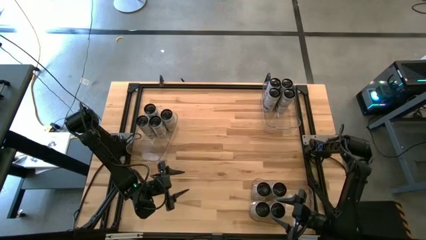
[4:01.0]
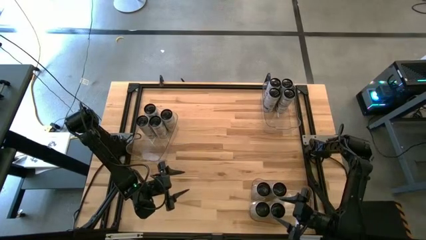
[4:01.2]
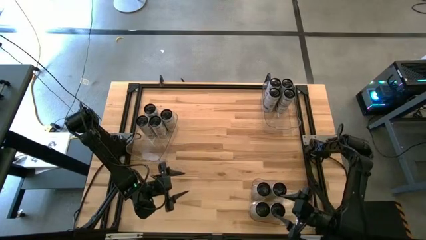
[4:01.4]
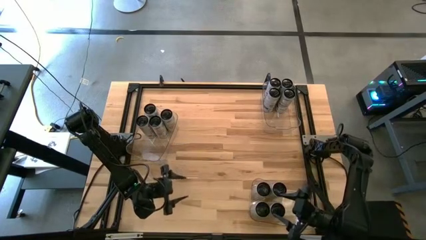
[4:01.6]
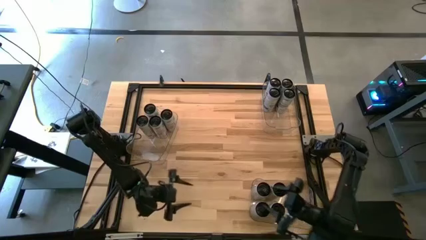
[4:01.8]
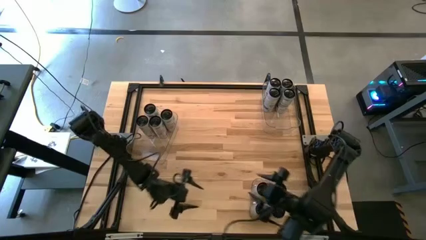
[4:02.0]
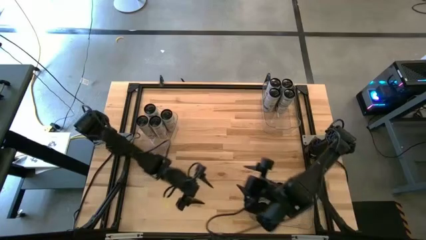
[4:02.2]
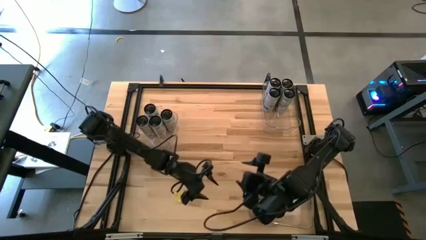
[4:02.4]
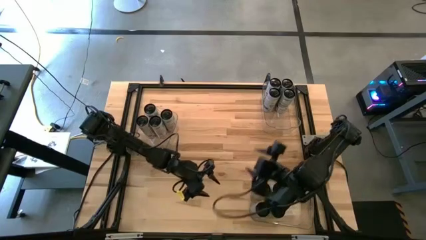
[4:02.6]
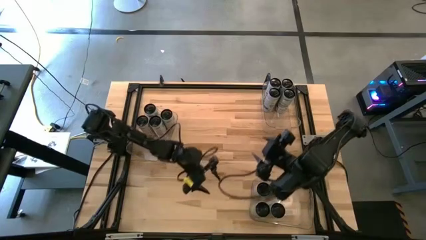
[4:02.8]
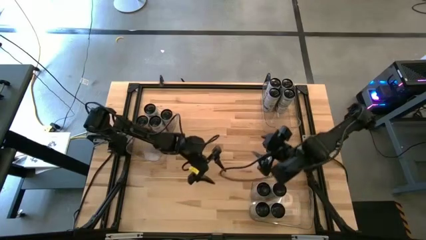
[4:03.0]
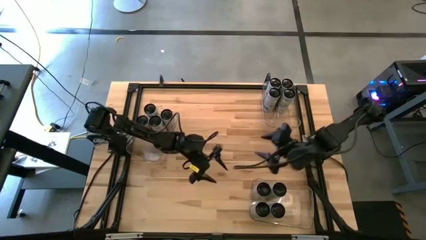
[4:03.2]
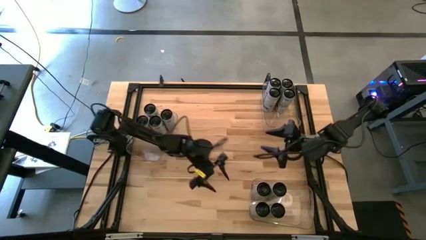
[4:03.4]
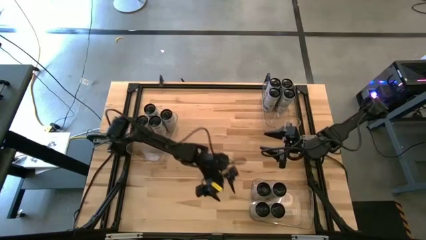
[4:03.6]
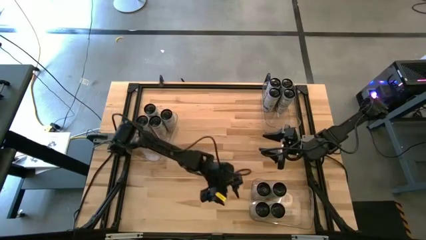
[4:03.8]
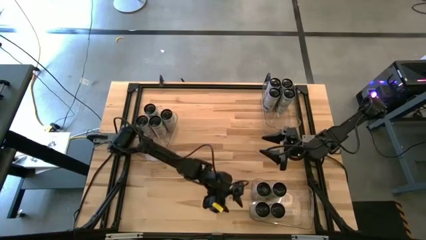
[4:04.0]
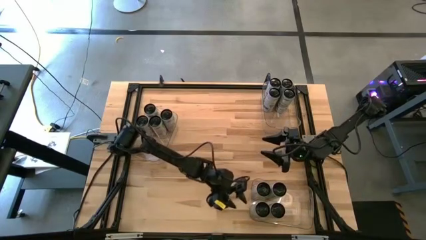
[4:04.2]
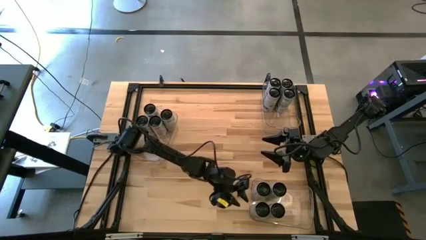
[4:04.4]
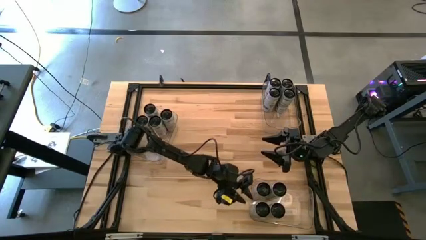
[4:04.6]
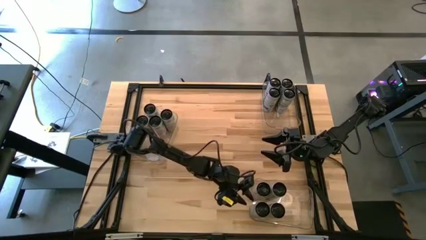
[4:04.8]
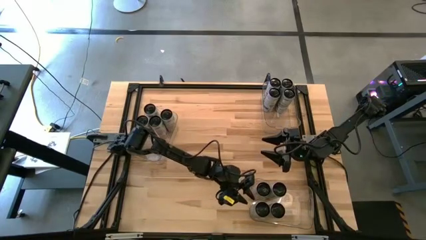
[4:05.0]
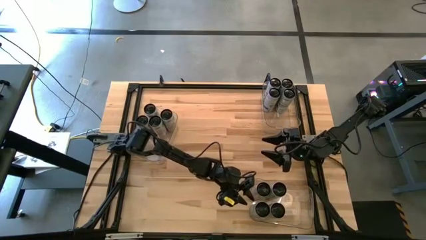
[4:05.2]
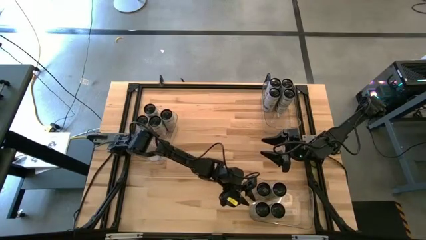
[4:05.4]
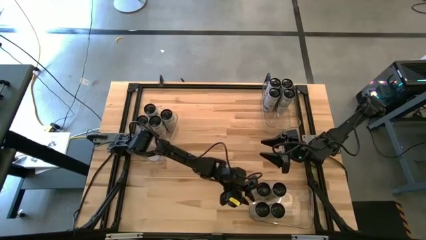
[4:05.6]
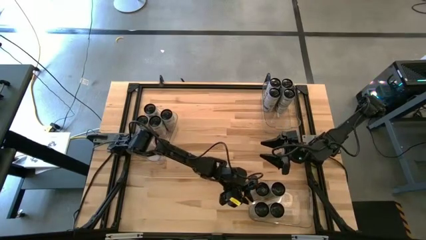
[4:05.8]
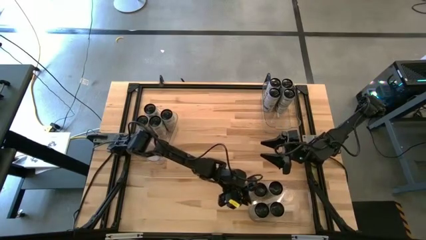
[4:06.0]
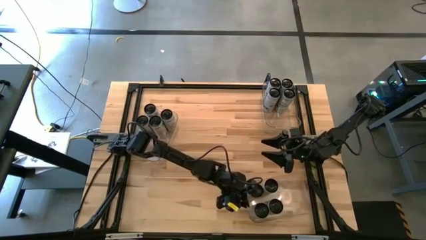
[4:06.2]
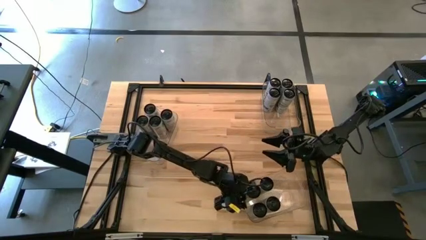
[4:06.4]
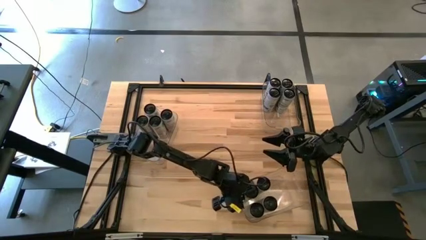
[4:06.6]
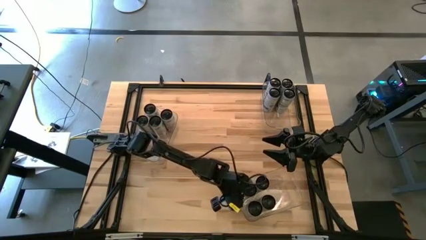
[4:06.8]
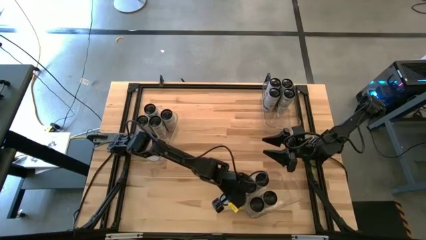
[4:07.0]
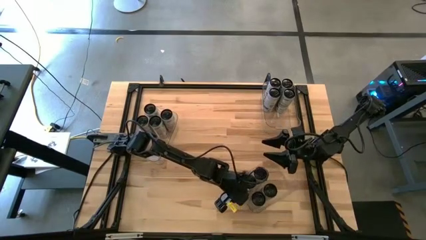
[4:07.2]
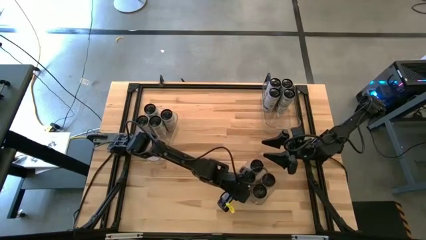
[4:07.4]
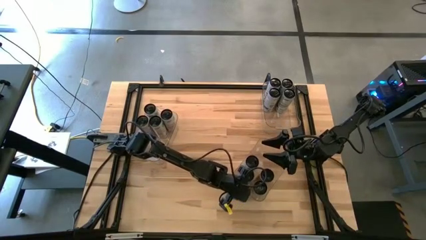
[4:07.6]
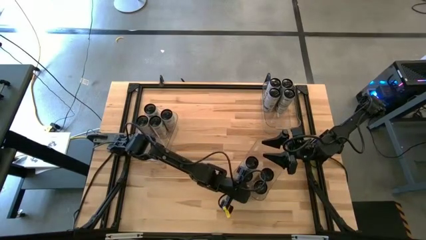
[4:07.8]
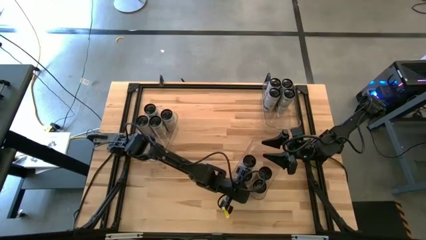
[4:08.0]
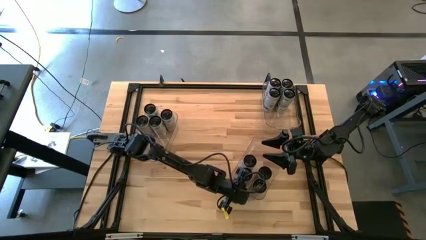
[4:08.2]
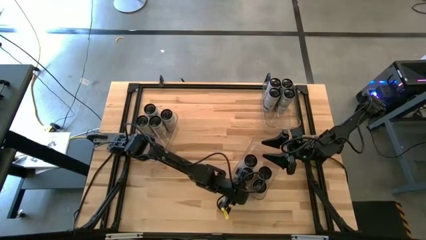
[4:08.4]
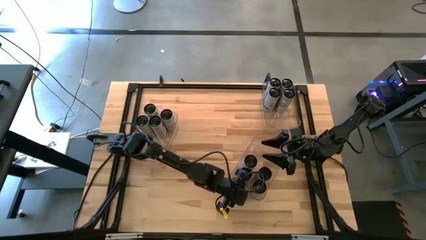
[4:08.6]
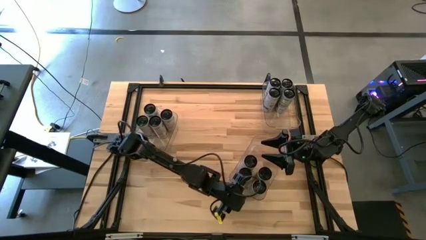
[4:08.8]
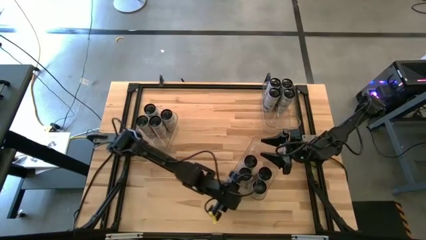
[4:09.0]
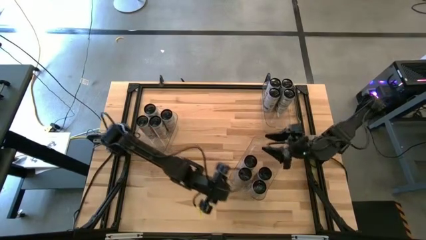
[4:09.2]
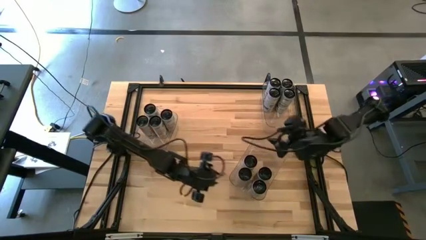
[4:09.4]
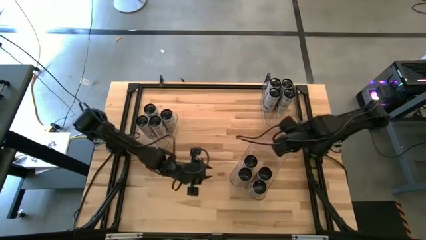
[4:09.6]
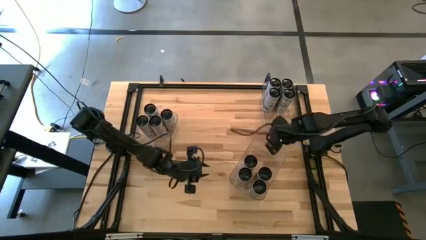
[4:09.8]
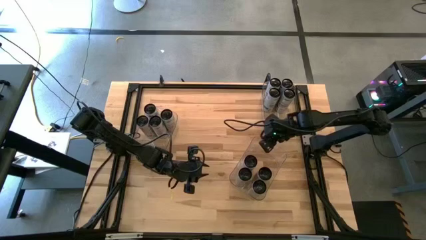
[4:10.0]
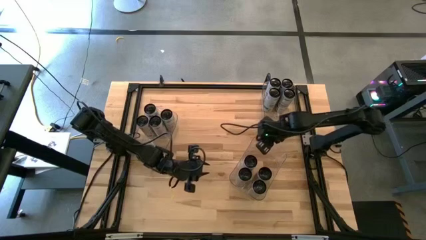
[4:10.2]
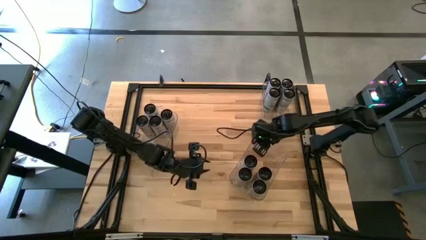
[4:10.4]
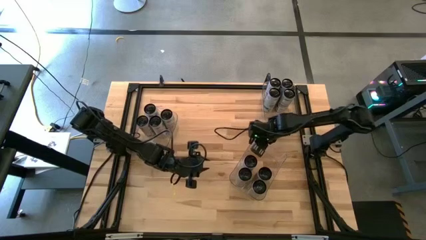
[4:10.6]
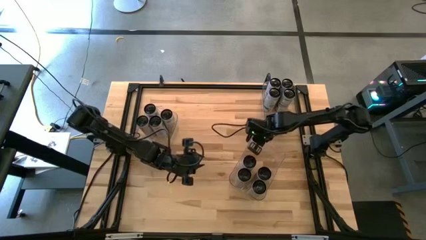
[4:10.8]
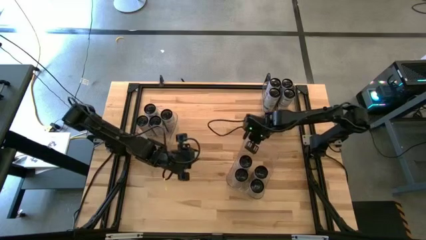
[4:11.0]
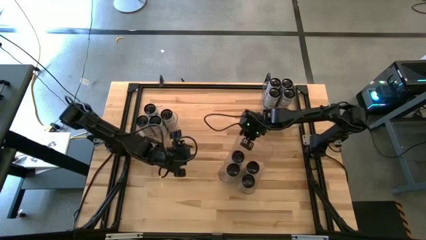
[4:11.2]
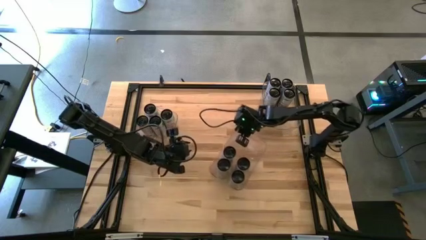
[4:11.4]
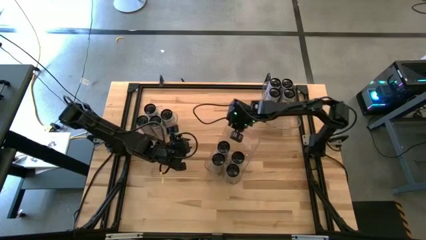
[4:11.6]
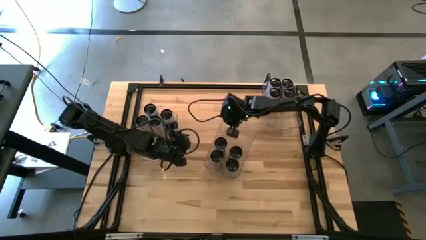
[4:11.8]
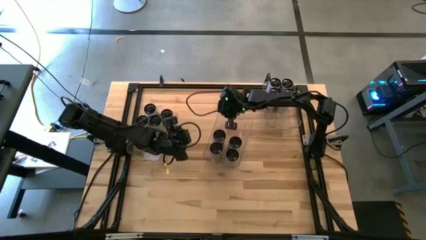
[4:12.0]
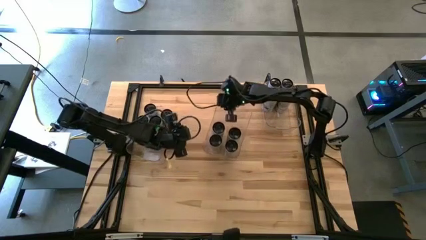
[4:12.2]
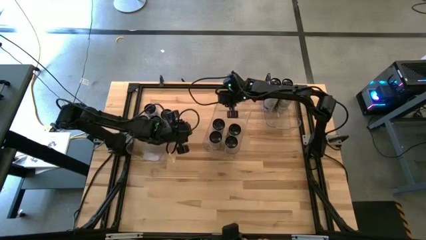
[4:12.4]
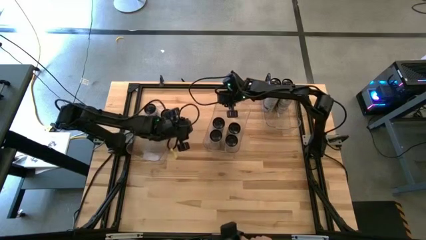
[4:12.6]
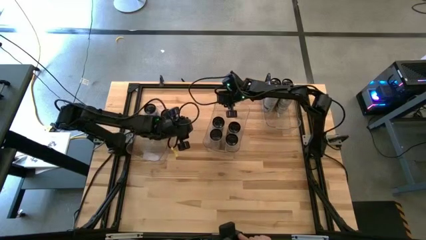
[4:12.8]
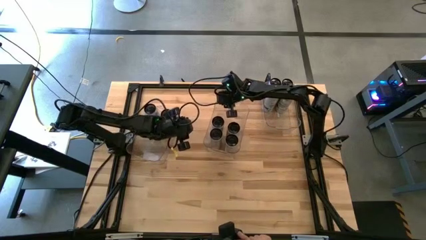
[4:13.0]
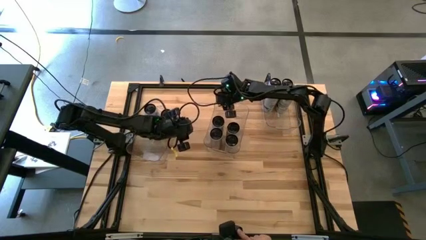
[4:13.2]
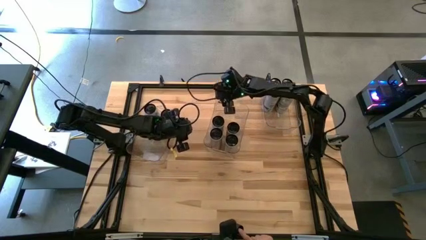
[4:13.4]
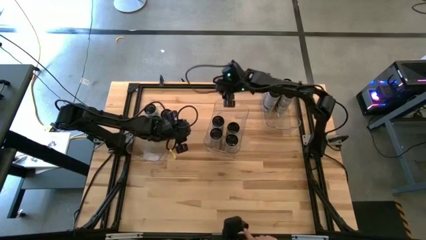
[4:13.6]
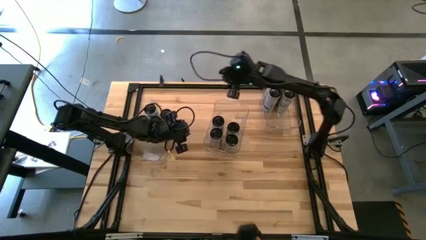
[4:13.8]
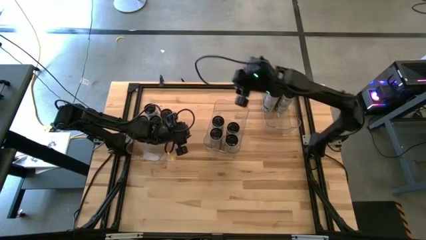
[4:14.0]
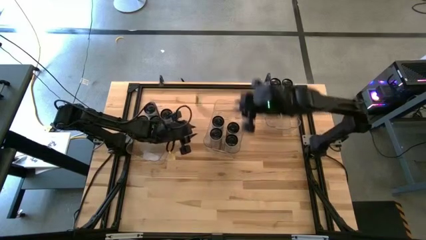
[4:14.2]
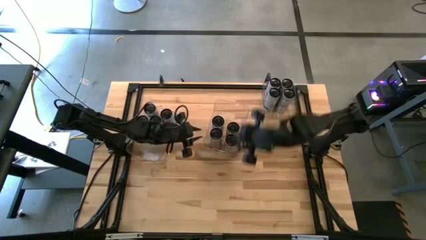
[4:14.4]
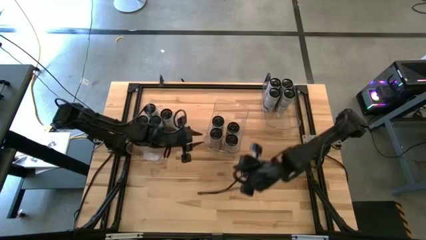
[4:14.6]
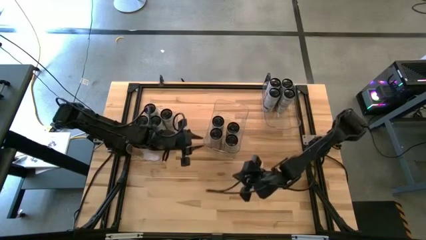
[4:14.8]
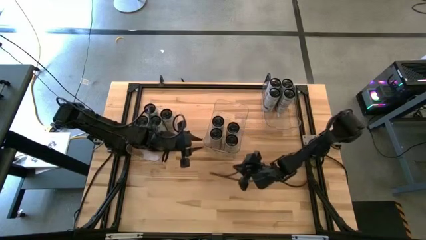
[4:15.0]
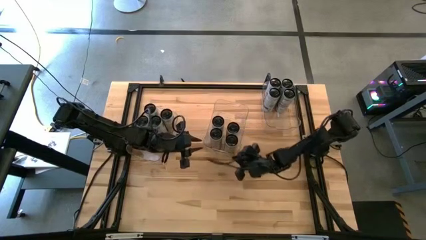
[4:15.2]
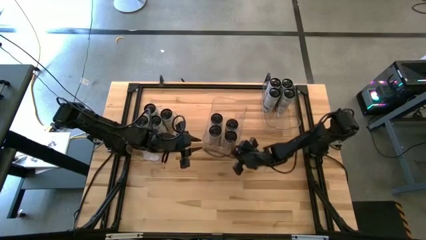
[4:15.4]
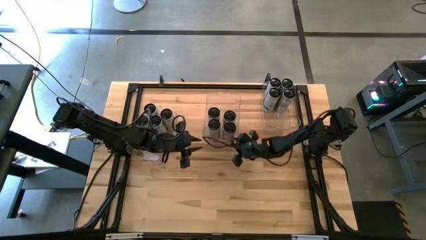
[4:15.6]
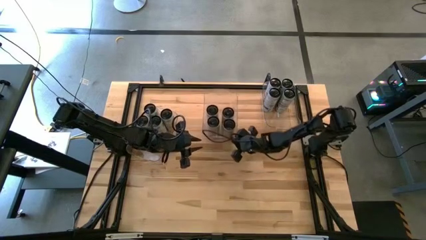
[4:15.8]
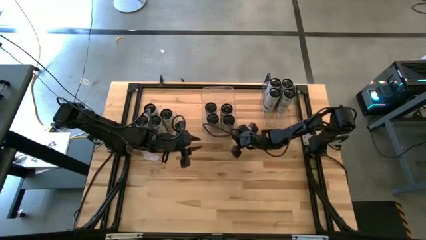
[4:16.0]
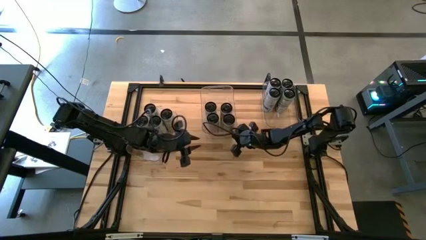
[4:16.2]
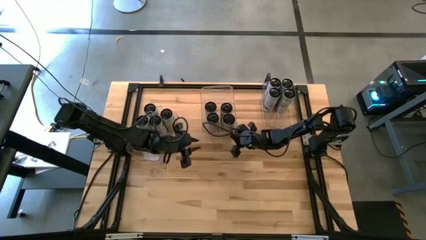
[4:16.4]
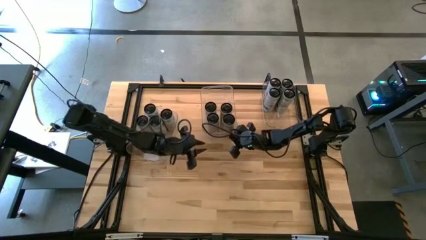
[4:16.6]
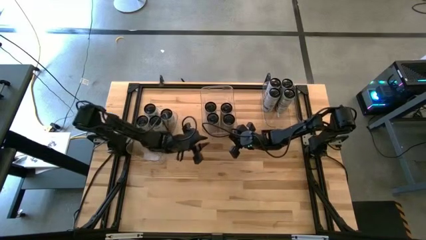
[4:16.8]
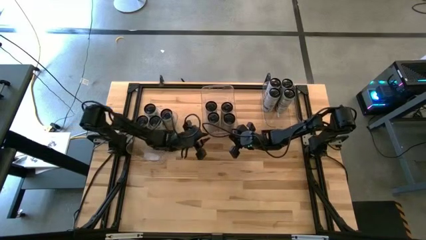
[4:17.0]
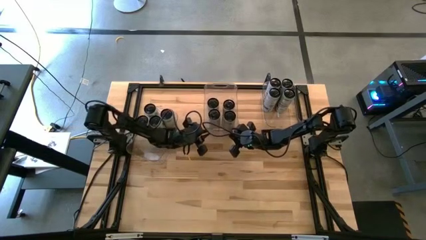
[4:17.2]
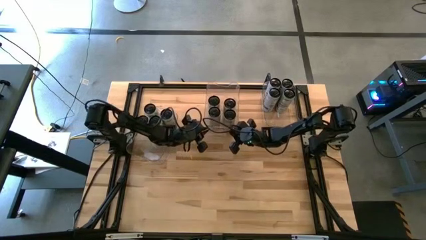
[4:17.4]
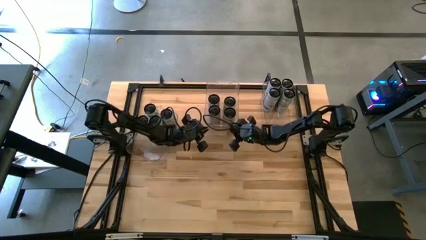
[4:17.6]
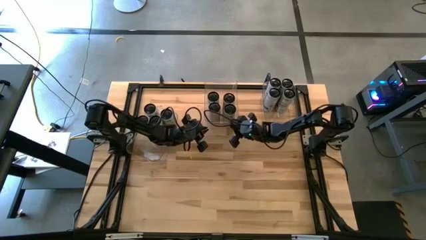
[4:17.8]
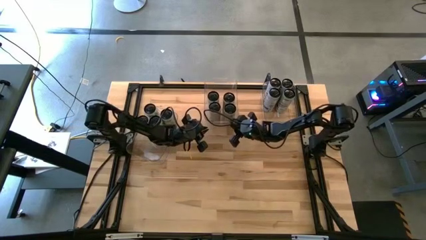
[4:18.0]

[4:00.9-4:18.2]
Task: Sort soda cans
Move the bottom transparent bin to the top center of the table
